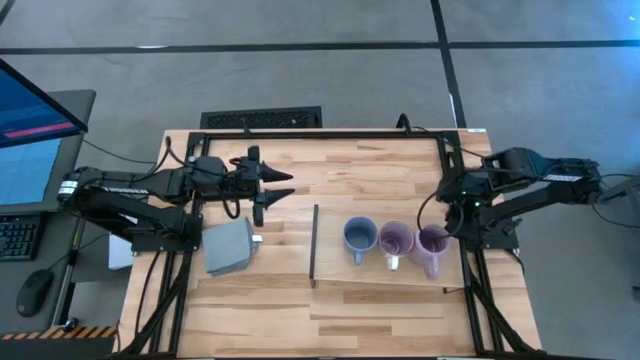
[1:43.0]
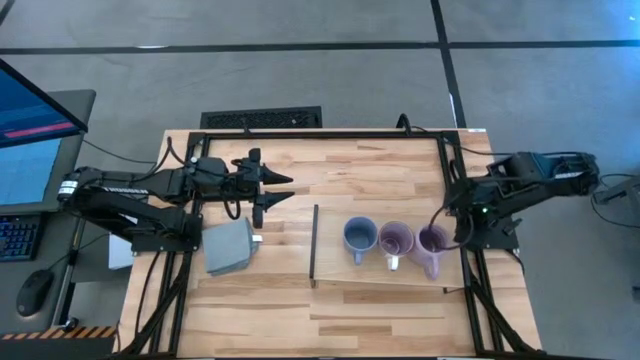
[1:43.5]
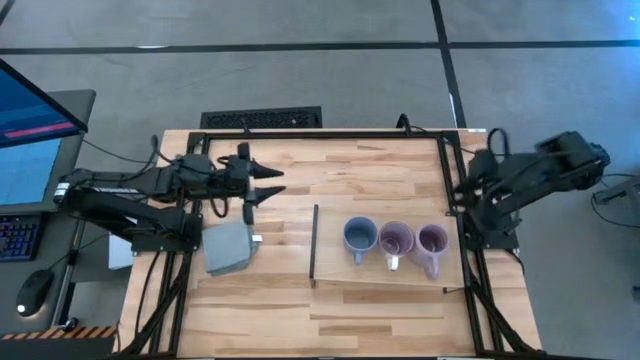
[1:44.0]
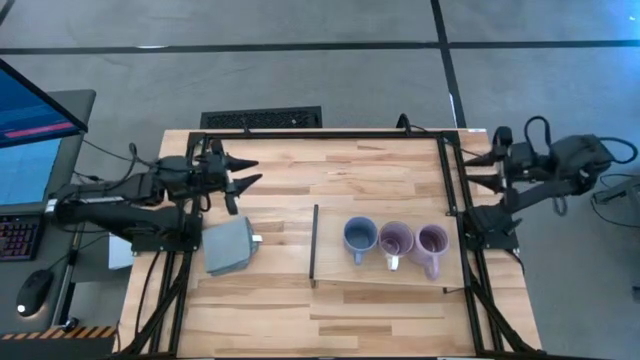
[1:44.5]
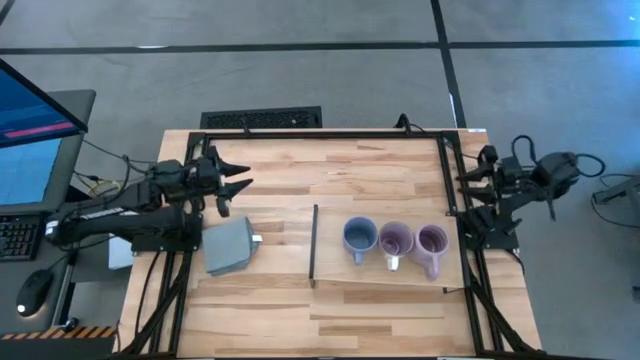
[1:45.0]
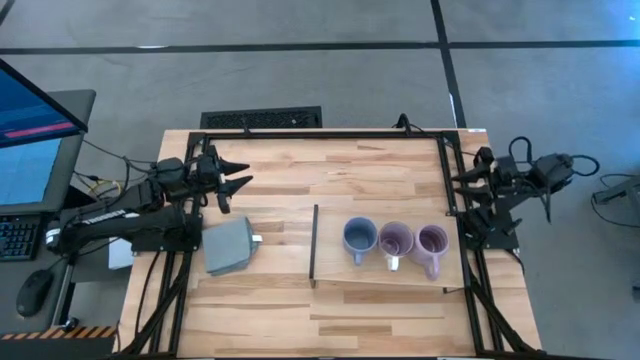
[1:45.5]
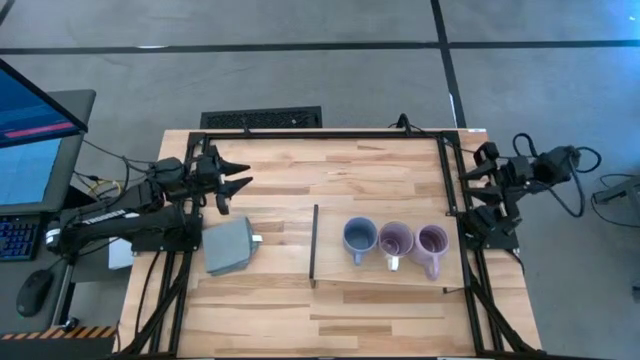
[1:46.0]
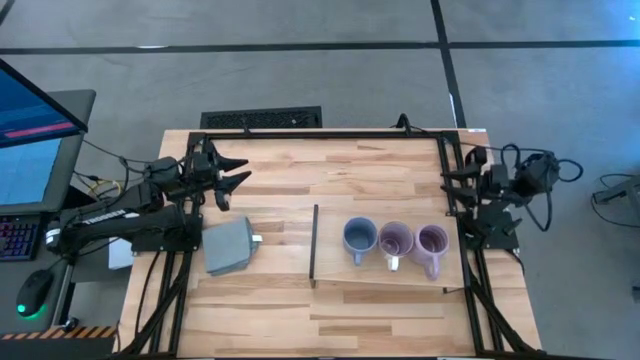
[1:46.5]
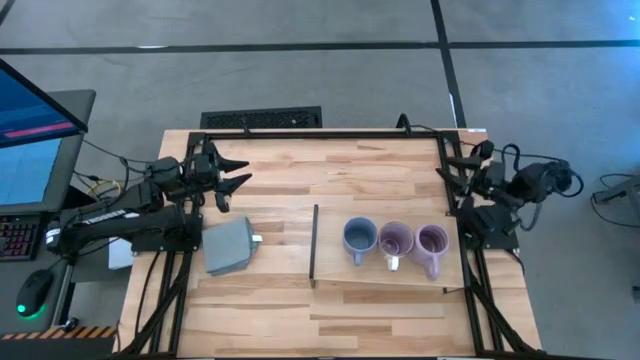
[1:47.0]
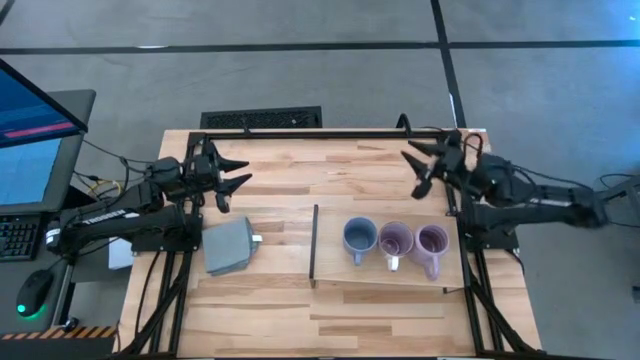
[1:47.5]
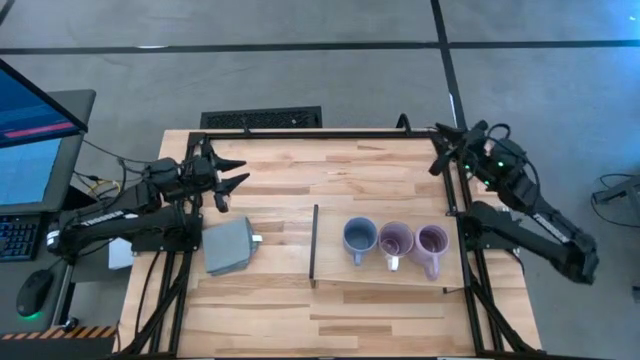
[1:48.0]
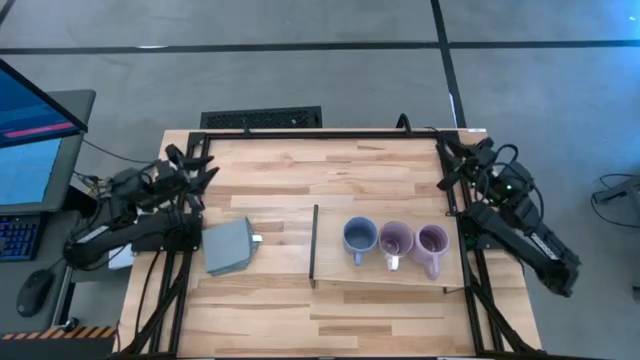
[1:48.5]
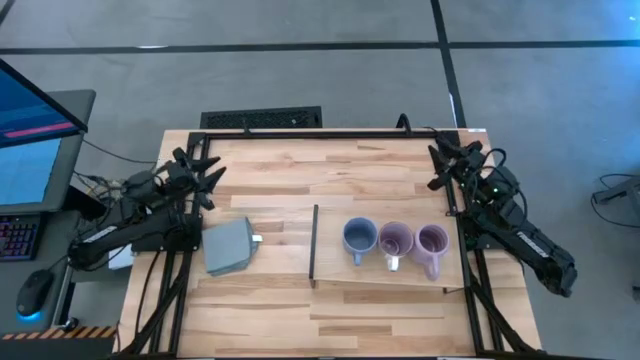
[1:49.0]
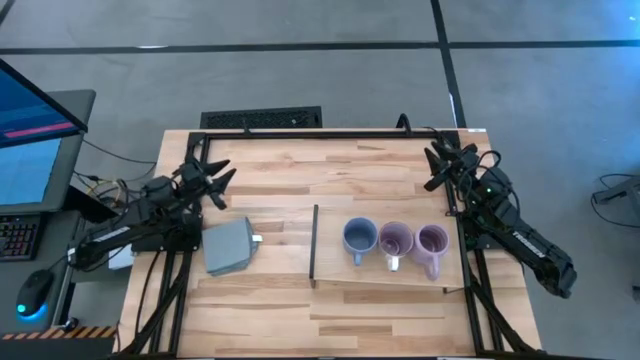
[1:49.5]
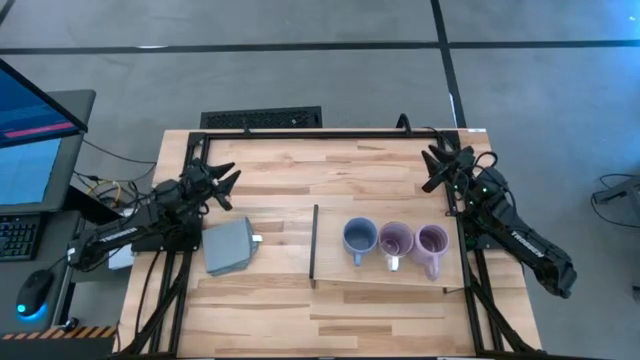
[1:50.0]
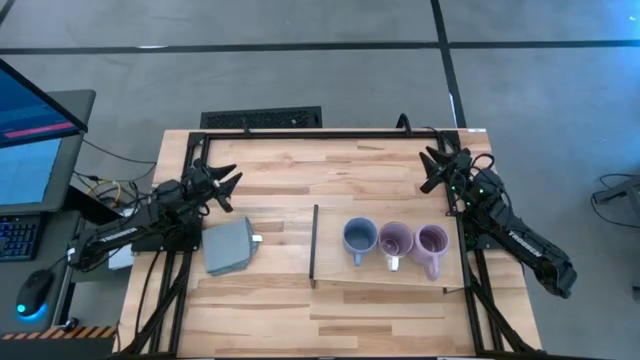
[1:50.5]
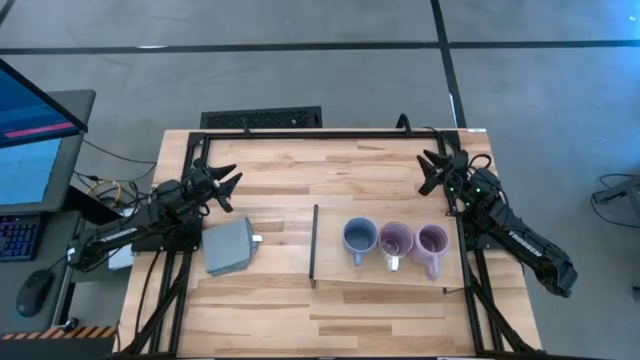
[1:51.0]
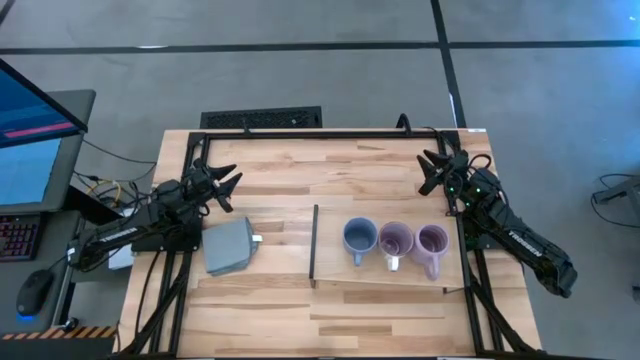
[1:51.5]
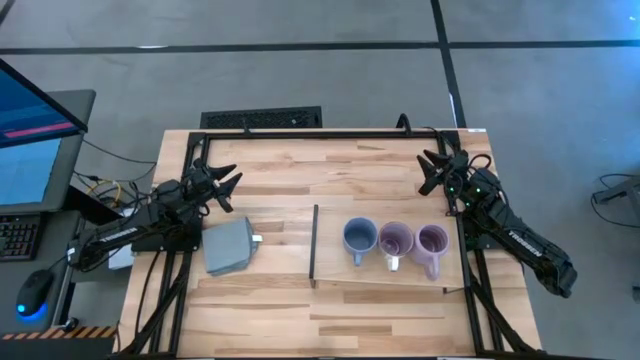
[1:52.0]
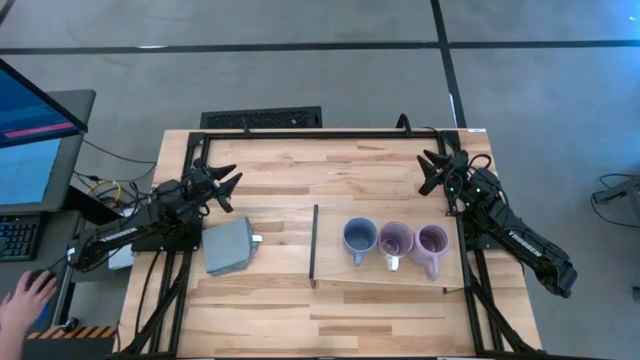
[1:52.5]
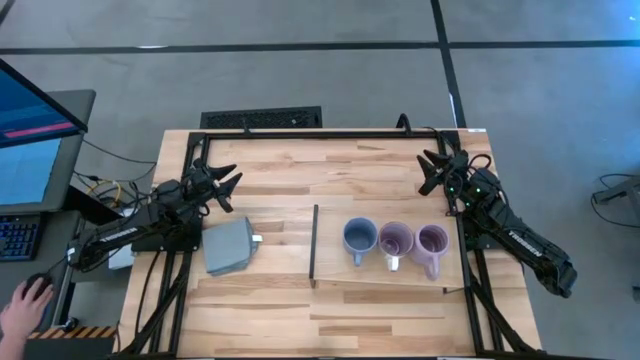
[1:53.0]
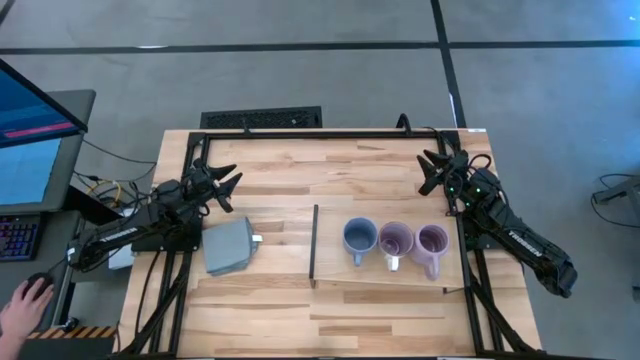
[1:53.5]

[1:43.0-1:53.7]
Task: Stack small to large cups/mugs on shelf
Return to Home Position

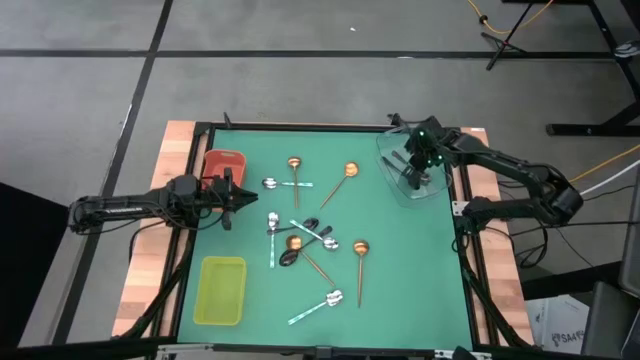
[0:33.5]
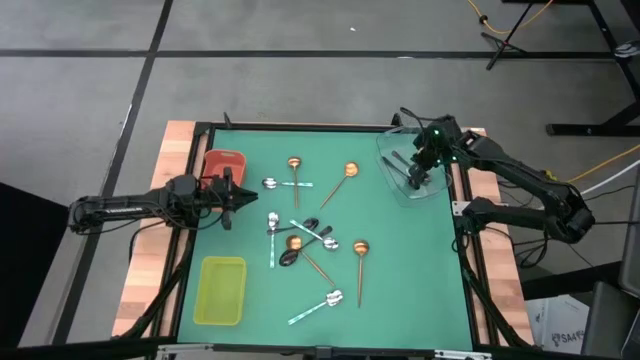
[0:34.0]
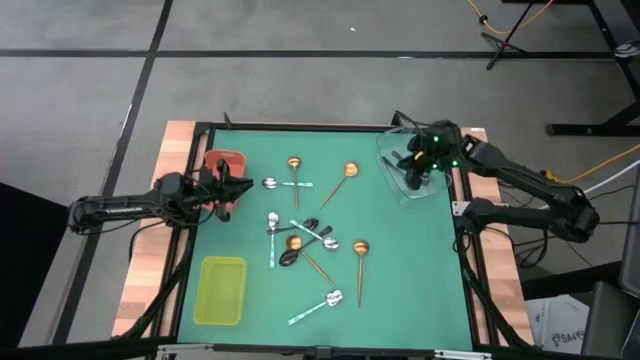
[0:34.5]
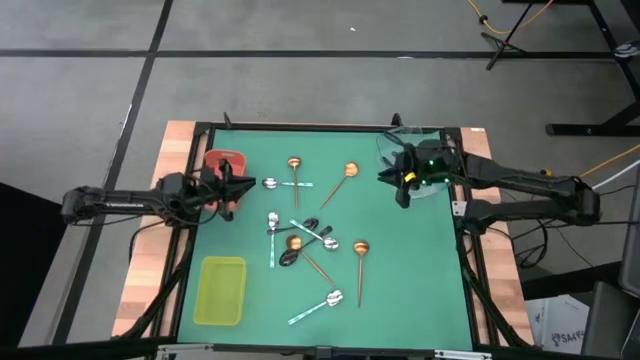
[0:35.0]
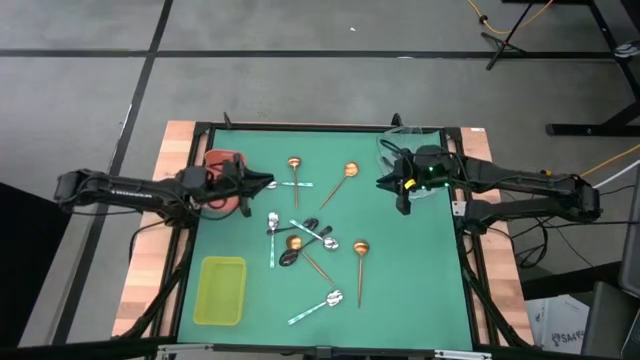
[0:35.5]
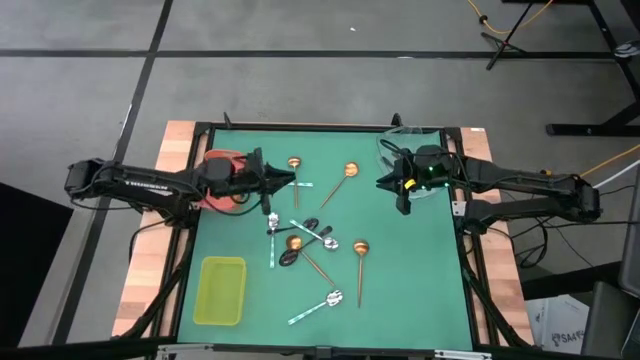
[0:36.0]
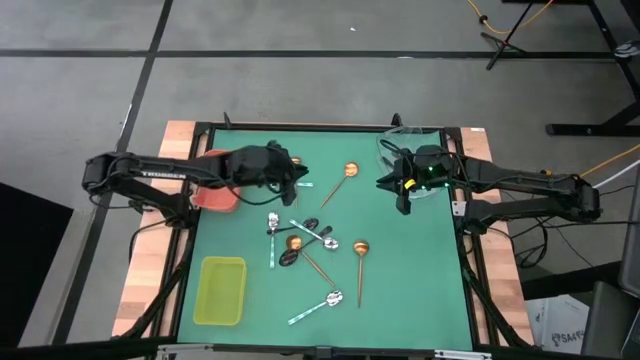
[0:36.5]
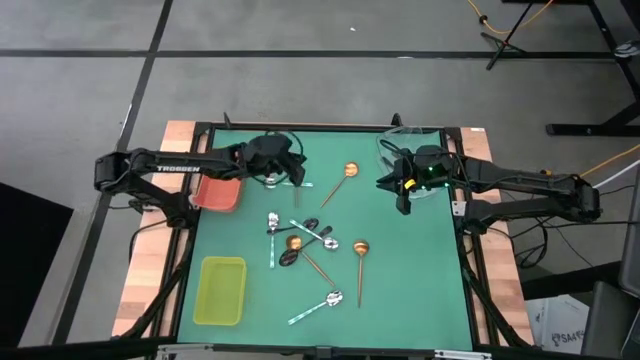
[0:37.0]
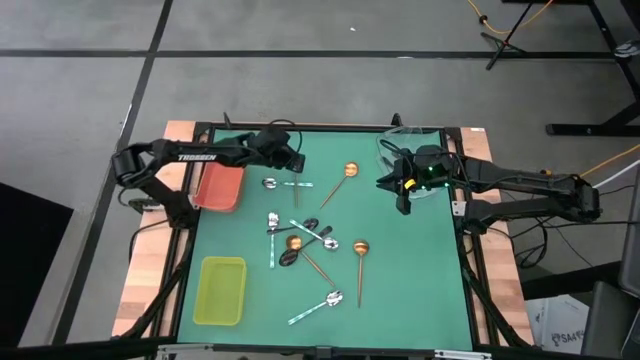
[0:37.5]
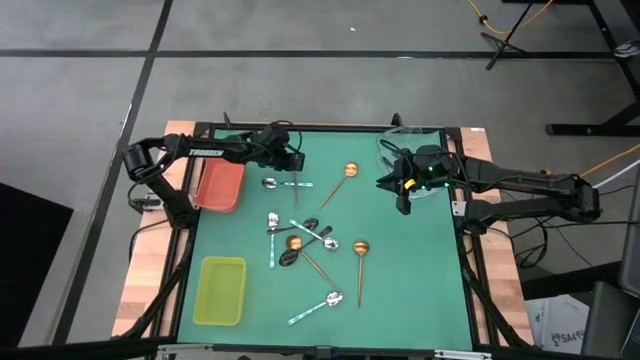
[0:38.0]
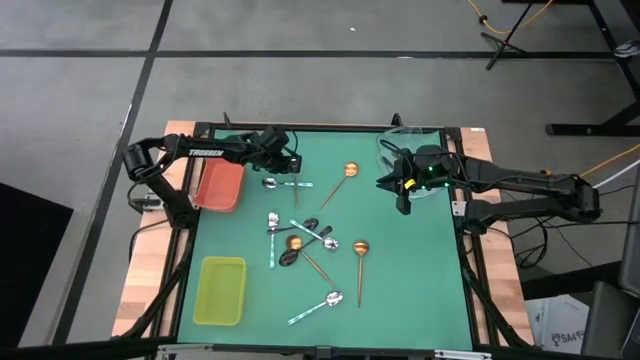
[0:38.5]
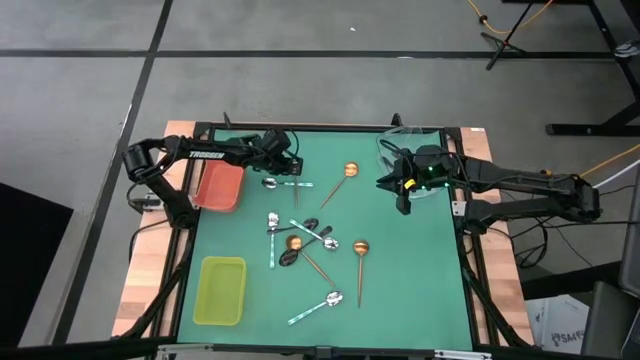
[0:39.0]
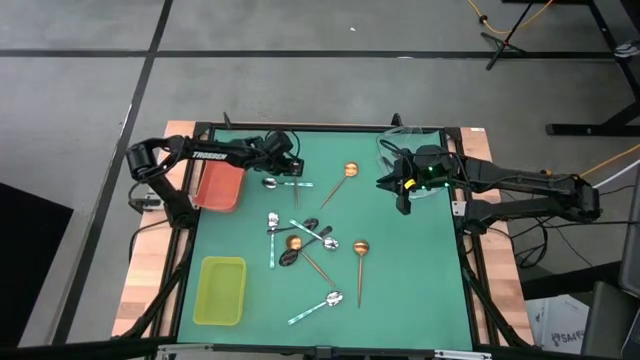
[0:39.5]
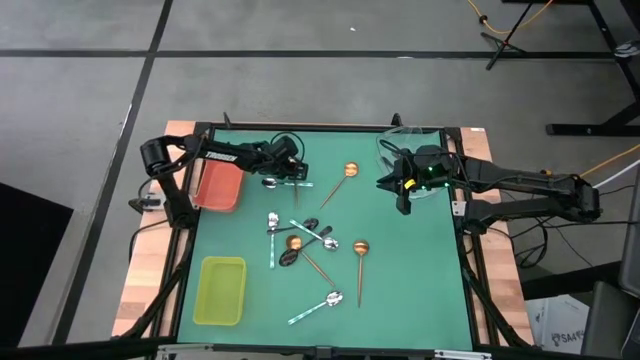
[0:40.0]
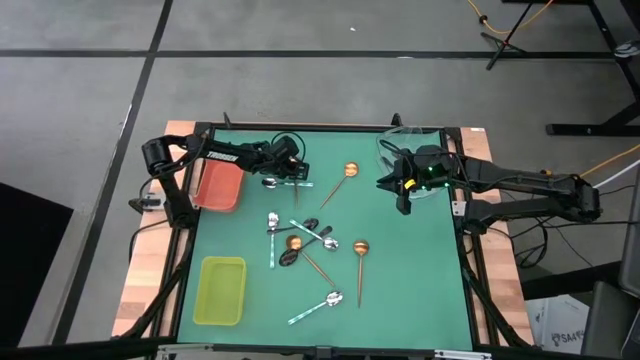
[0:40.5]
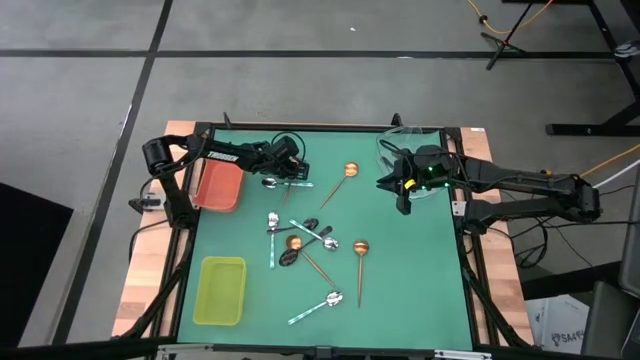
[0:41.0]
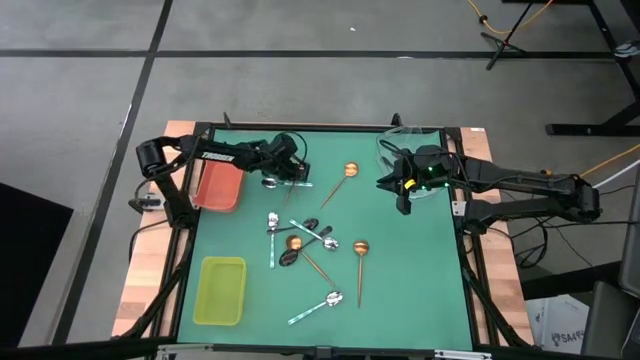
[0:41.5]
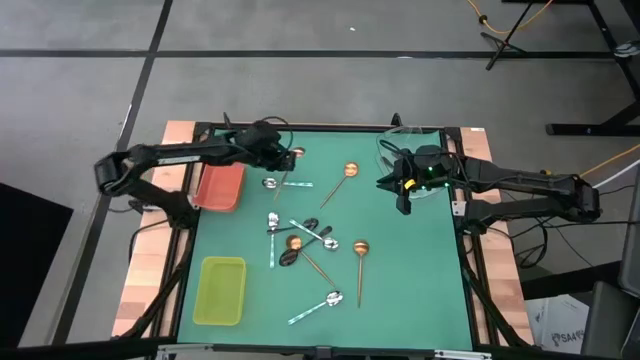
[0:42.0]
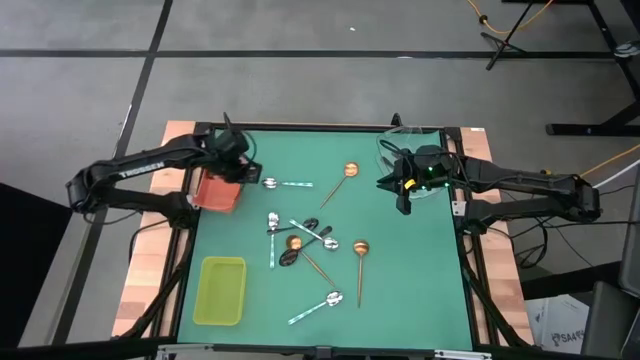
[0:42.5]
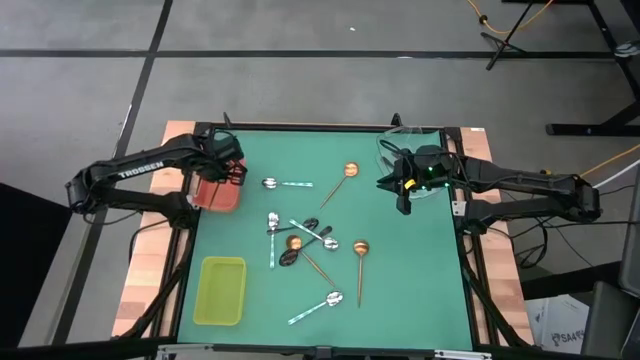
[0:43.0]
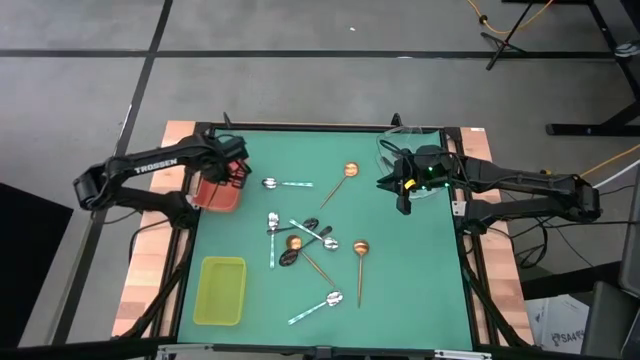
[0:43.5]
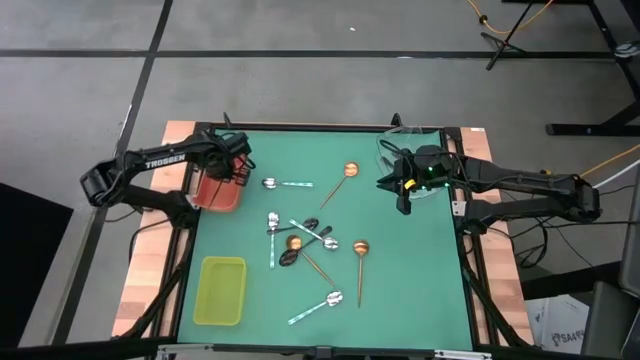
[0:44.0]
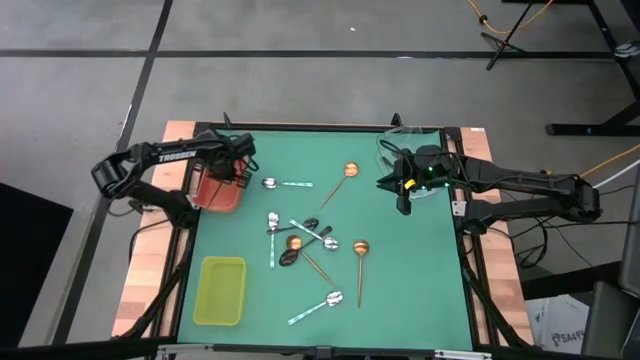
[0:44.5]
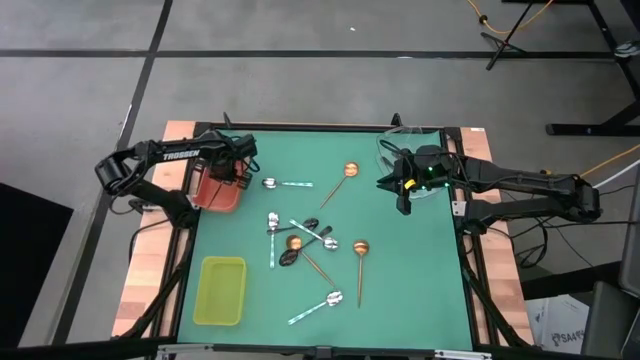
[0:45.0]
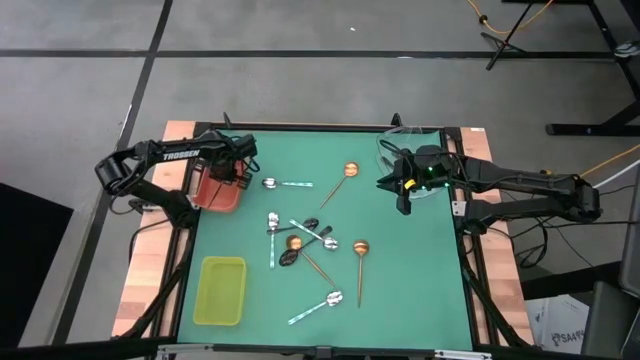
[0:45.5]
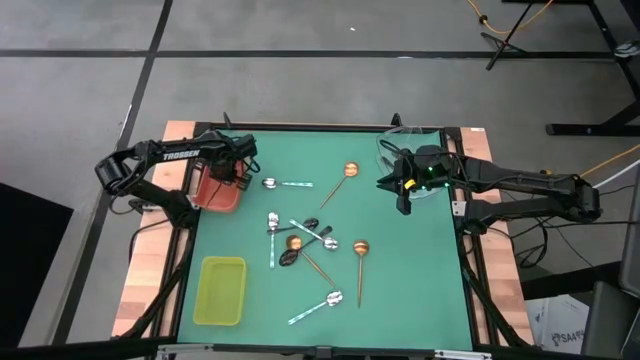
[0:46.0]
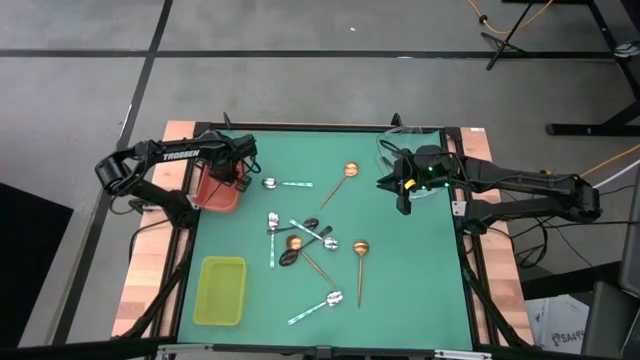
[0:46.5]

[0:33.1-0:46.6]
Task: Sort silverware by color (type)
Put the gold spoon into the orange bin
